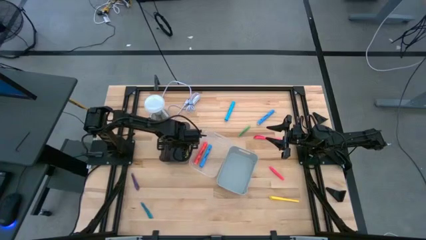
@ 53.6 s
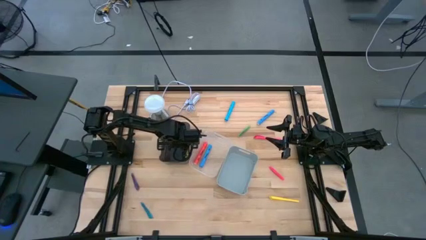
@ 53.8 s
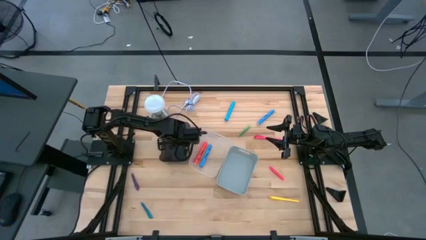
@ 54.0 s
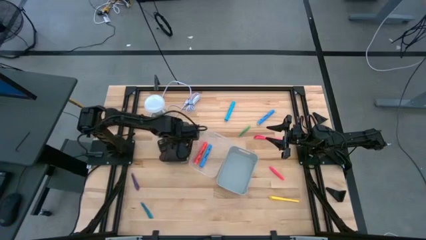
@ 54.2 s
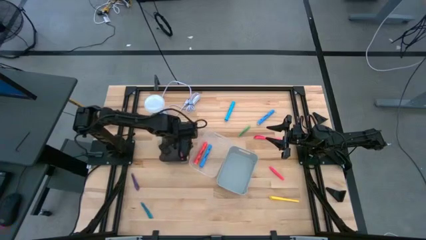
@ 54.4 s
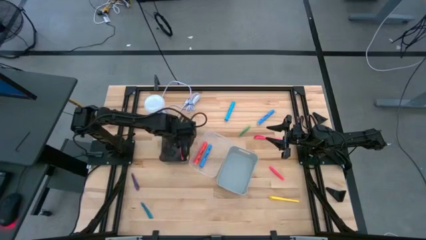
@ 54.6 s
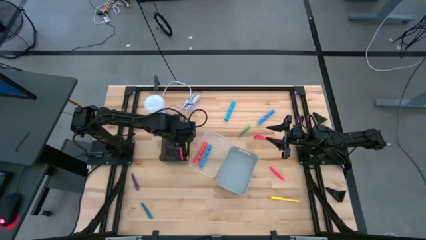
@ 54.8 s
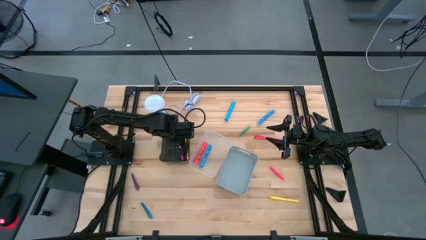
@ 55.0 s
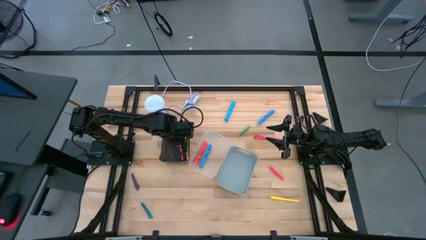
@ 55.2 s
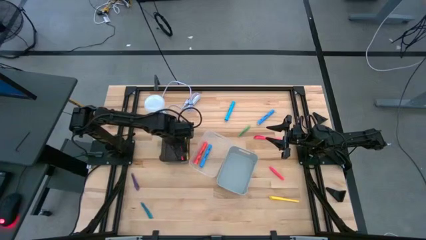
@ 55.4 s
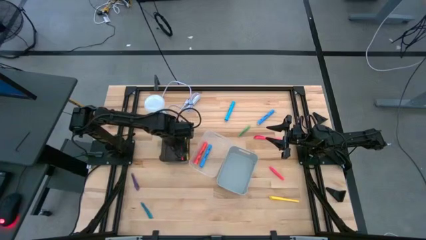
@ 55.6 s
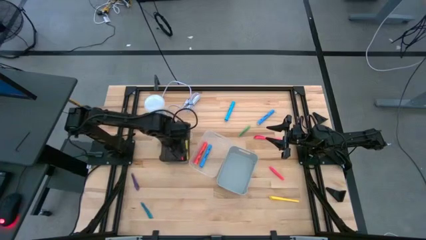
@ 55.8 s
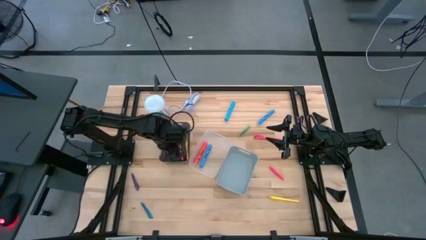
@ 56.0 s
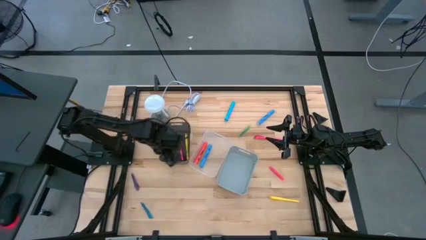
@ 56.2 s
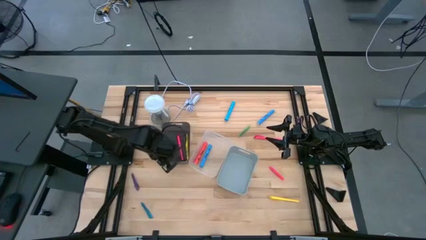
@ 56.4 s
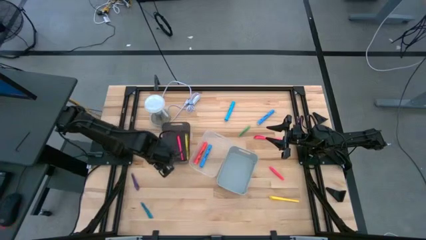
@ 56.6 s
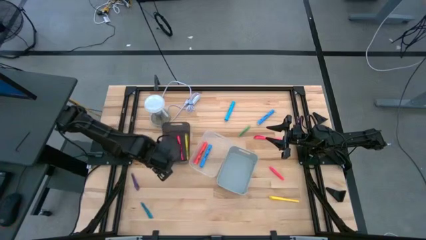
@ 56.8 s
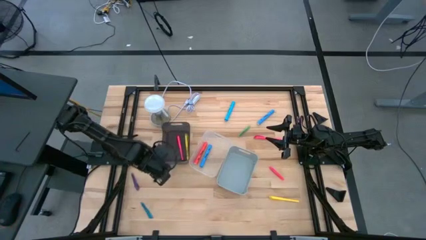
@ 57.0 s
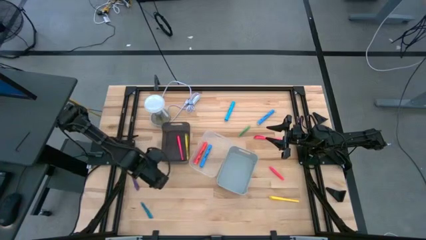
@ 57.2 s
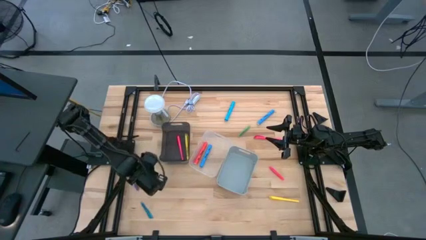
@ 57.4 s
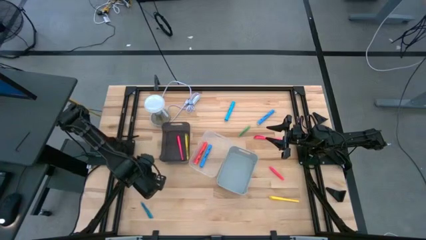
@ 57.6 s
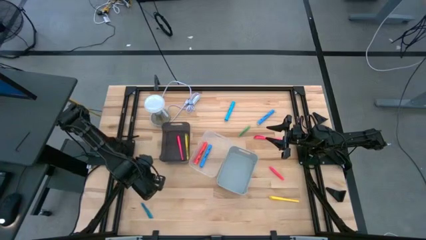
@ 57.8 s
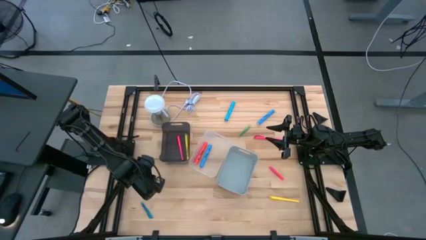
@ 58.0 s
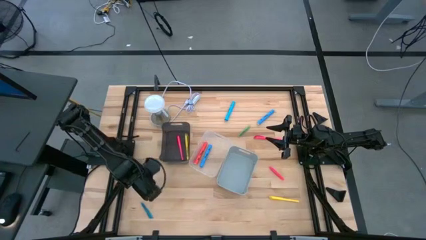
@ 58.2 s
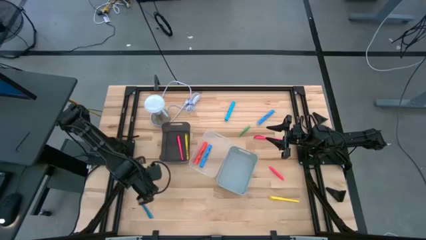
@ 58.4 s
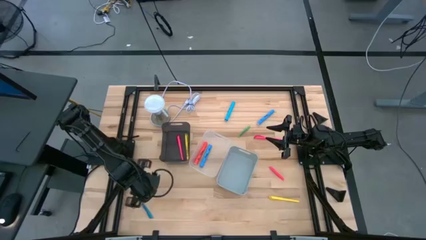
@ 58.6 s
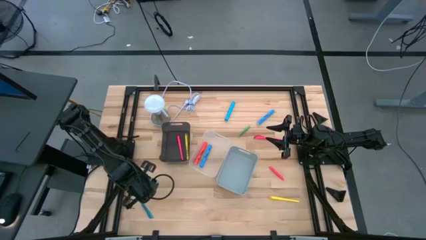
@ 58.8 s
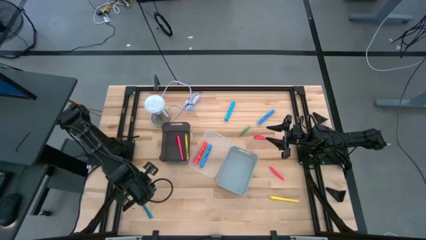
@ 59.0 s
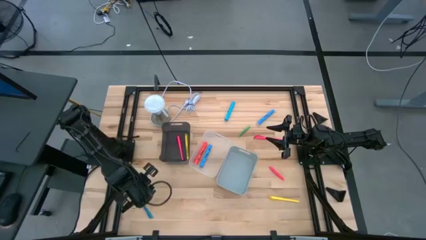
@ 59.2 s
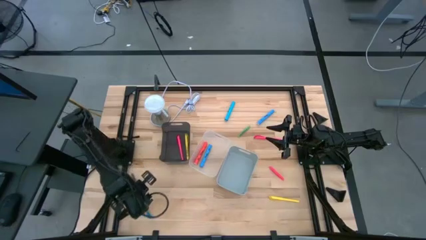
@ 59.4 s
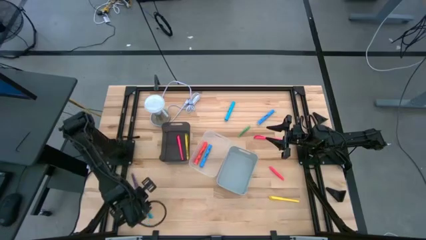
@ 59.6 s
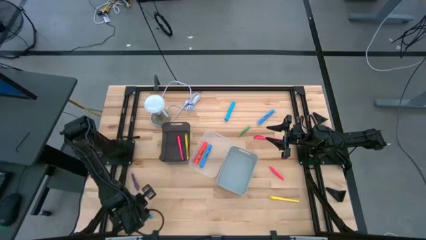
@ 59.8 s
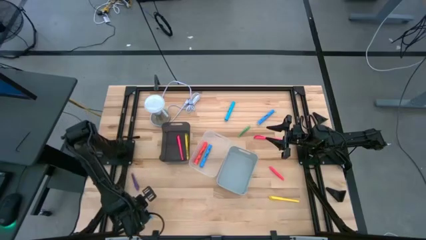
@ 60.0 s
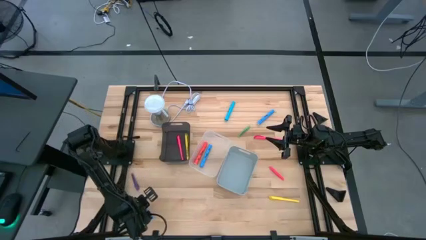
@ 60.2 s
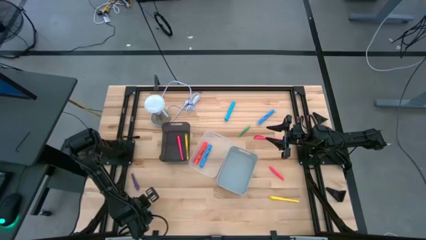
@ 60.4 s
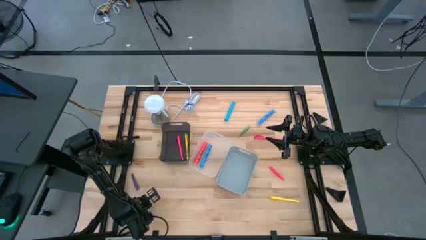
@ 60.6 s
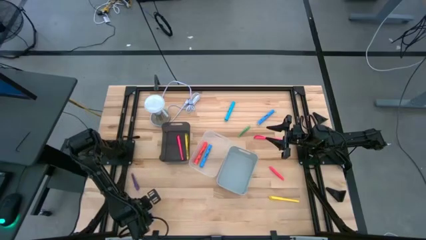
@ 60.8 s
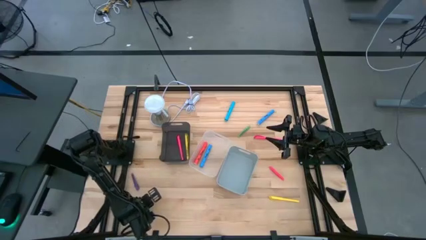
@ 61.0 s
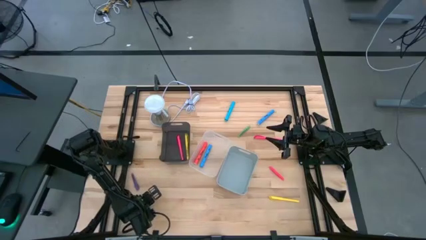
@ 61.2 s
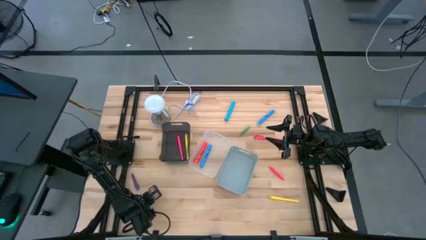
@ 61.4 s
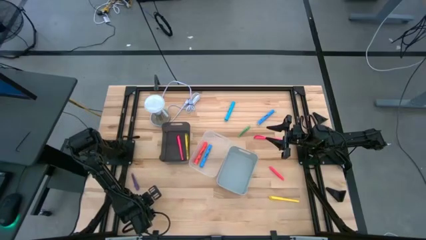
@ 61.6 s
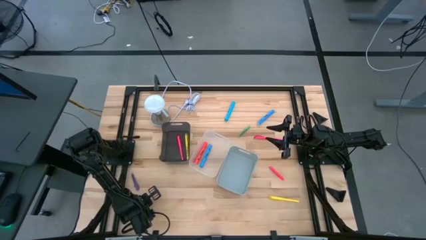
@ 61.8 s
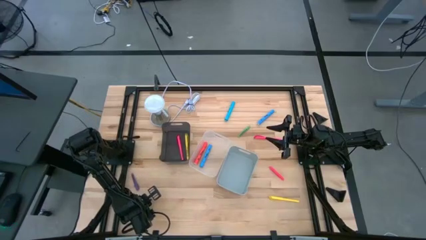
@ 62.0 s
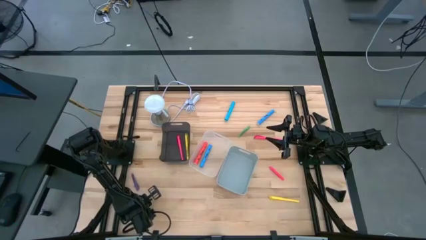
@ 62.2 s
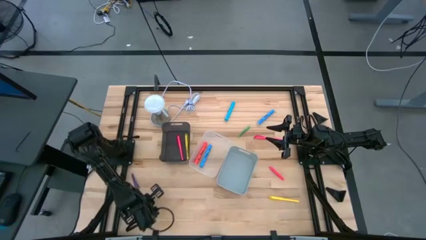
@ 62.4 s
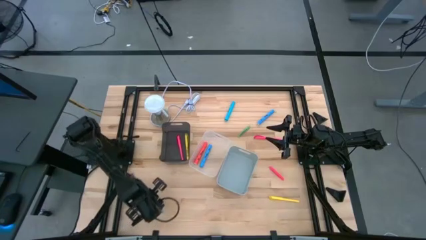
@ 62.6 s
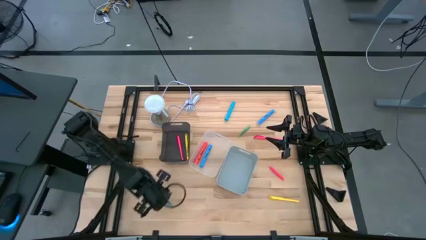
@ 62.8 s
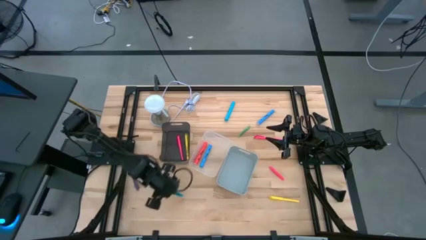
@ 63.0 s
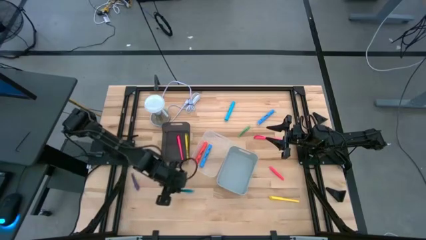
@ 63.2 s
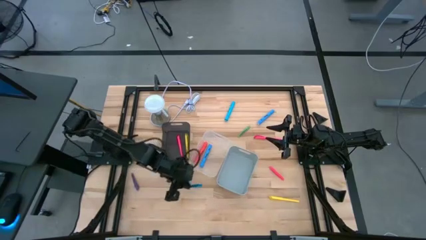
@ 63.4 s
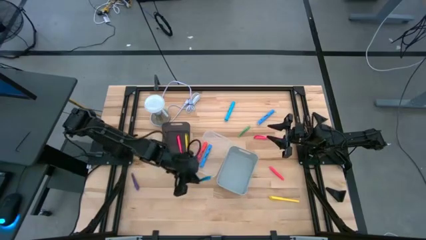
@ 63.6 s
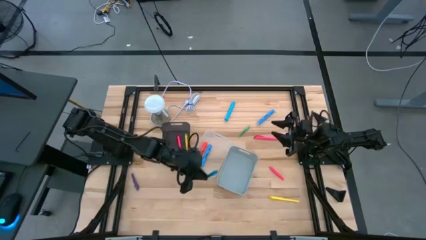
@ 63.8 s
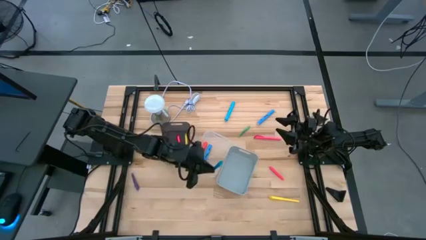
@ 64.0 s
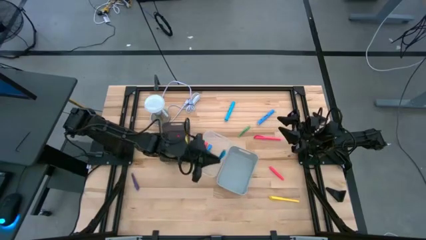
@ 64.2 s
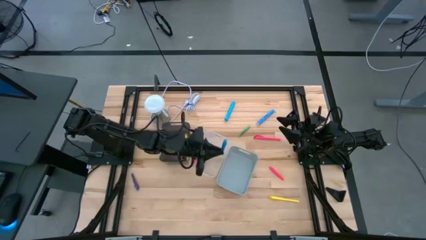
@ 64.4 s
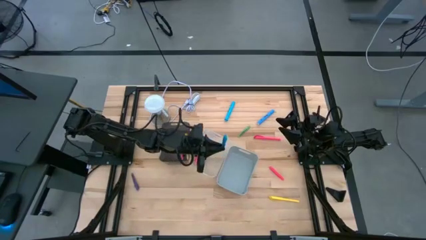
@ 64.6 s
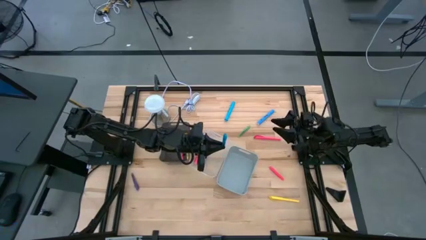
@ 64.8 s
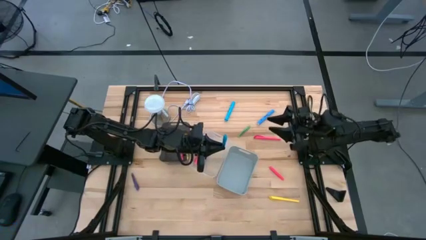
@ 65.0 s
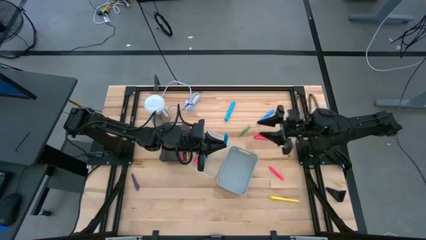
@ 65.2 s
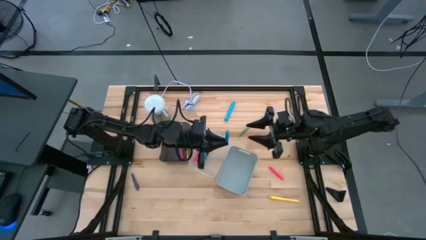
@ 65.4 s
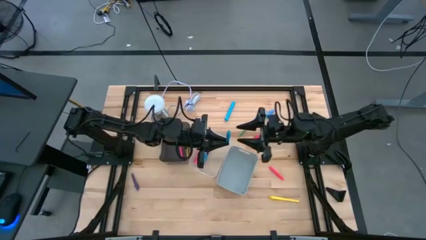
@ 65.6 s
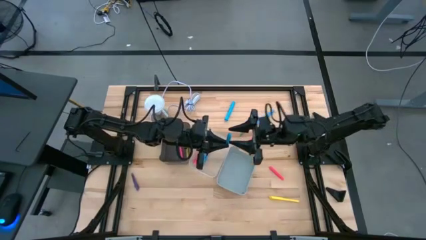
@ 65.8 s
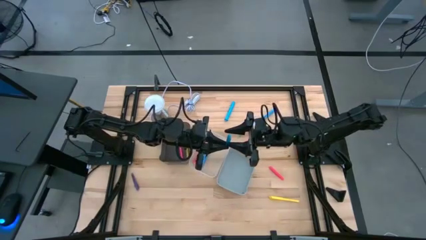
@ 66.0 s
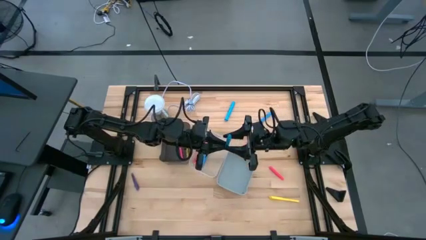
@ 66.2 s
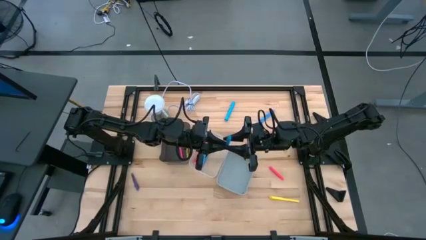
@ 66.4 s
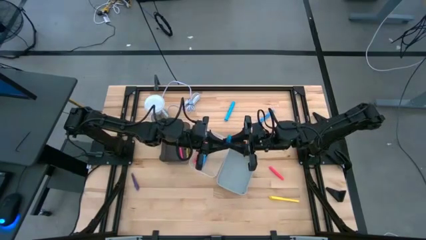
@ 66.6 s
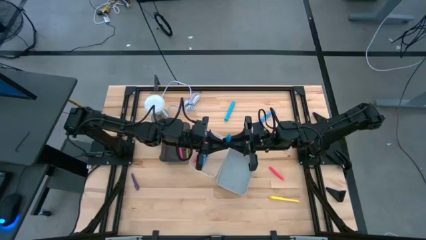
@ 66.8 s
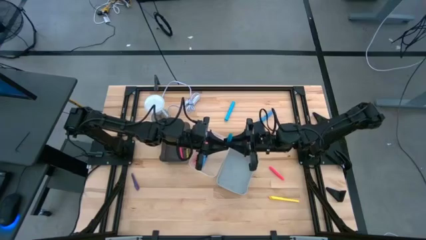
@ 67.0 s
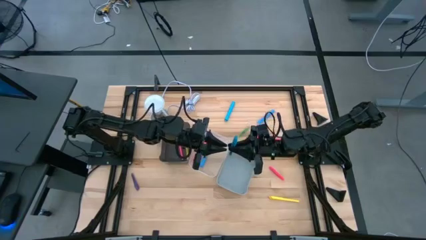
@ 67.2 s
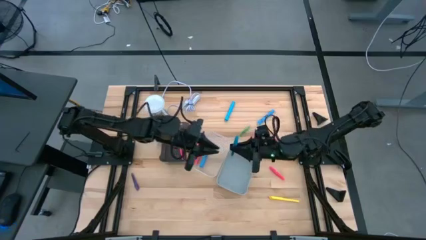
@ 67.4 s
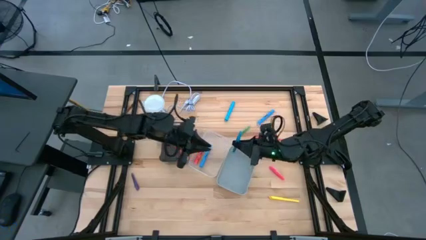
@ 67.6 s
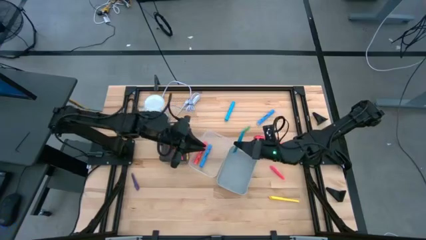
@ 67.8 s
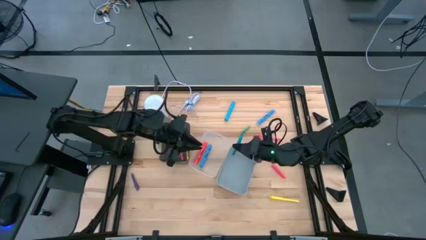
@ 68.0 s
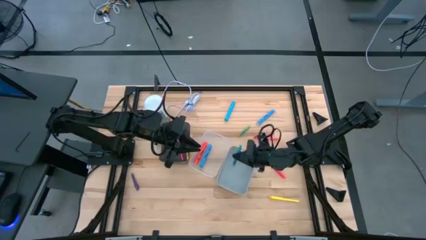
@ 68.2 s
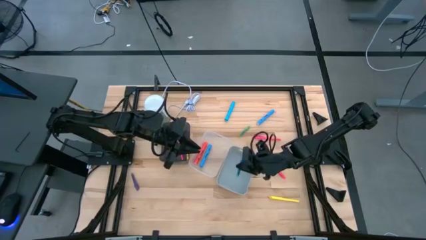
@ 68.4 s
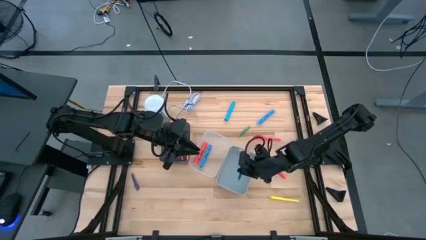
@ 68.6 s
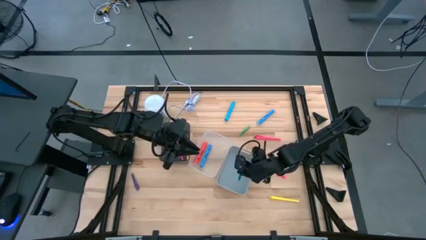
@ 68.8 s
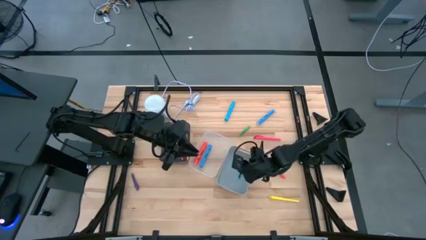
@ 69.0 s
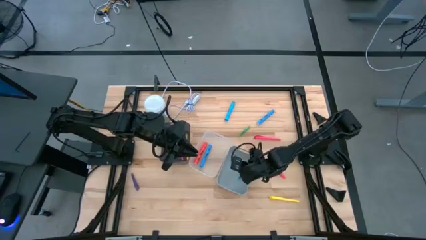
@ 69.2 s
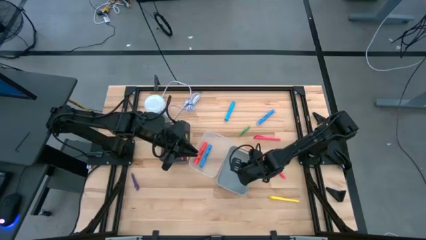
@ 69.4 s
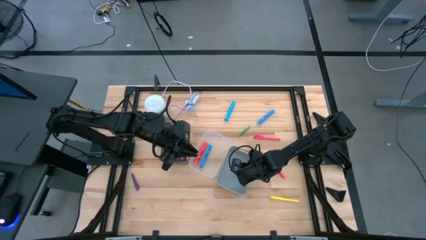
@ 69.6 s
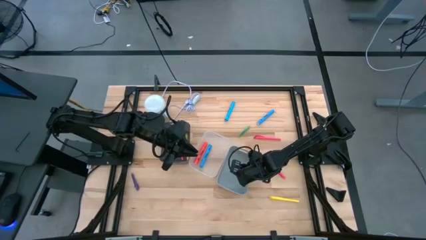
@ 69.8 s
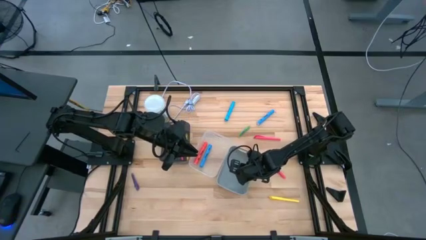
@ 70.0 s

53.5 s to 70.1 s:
Task: Pick & Place Markers
Put the blue pen into the gray bin

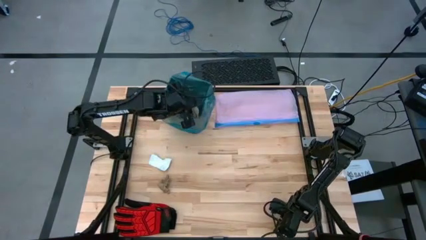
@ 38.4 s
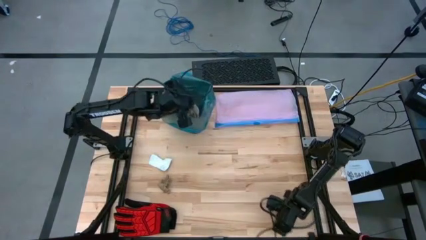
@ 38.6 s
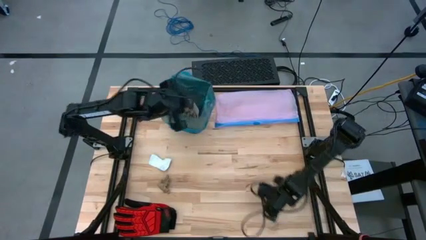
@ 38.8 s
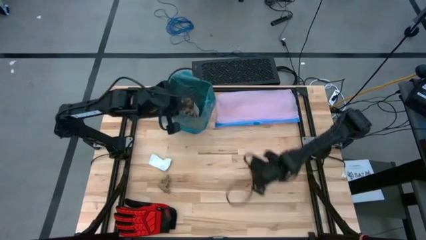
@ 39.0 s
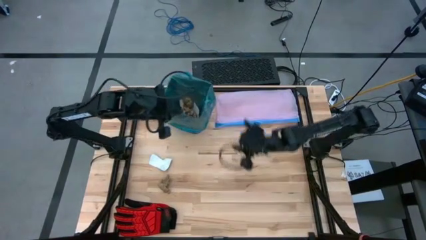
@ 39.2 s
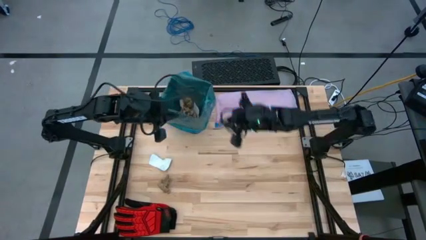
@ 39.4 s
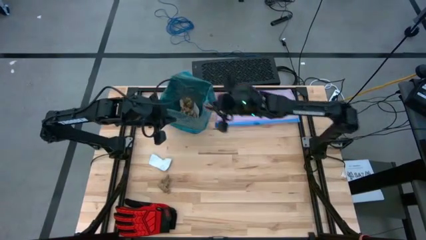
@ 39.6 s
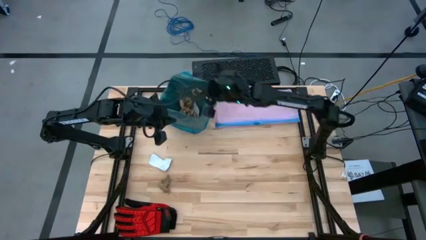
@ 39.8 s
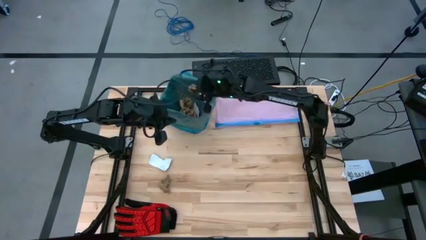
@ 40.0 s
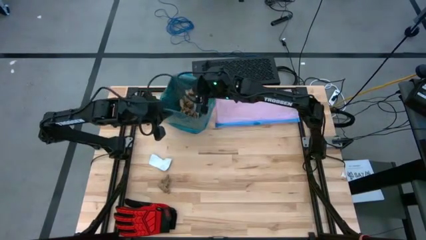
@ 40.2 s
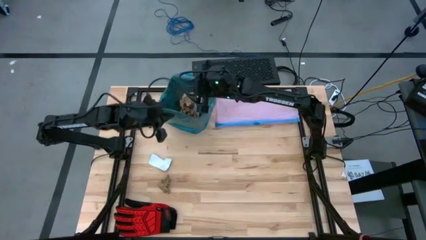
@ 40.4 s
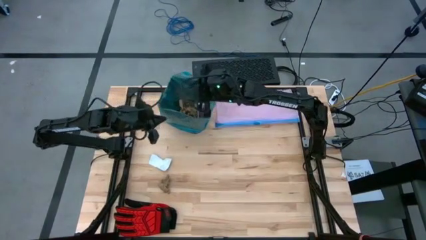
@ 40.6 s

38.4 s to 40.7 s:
Task: place trash/remove bag and relplace
Put the brown napkin into the trash bin
